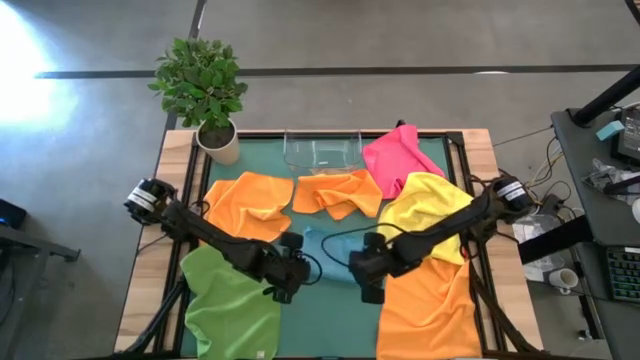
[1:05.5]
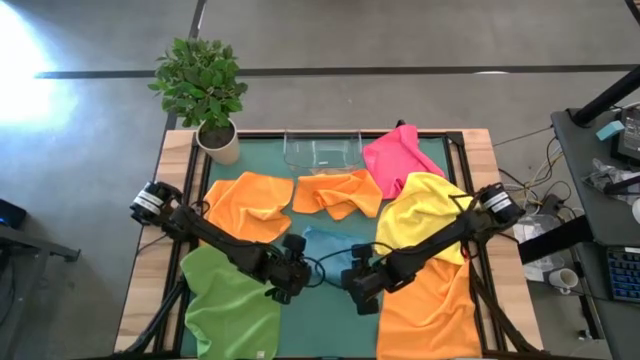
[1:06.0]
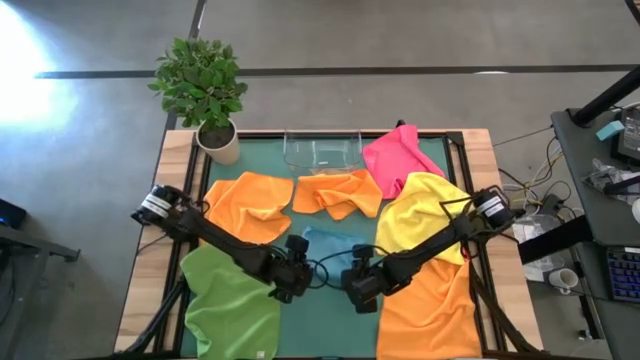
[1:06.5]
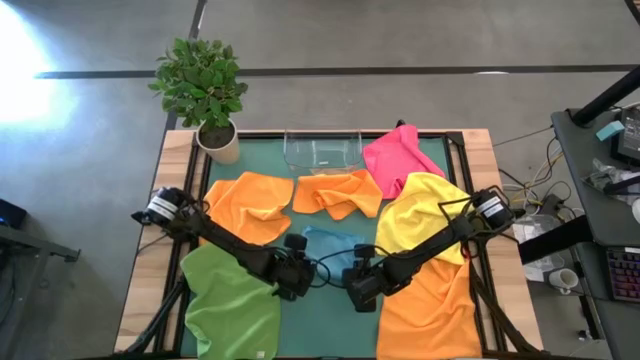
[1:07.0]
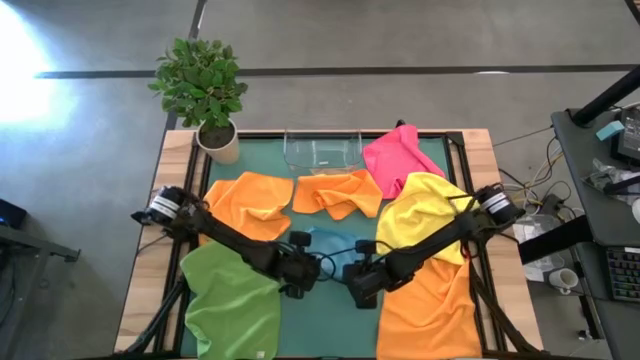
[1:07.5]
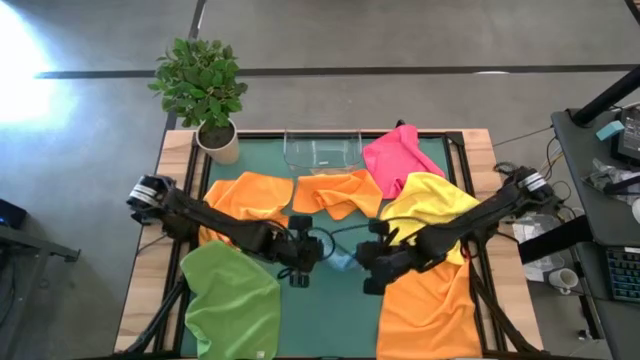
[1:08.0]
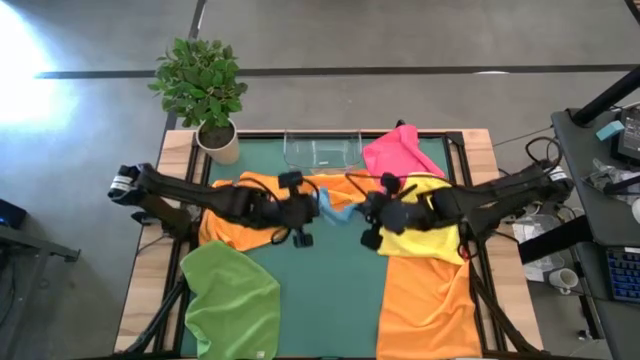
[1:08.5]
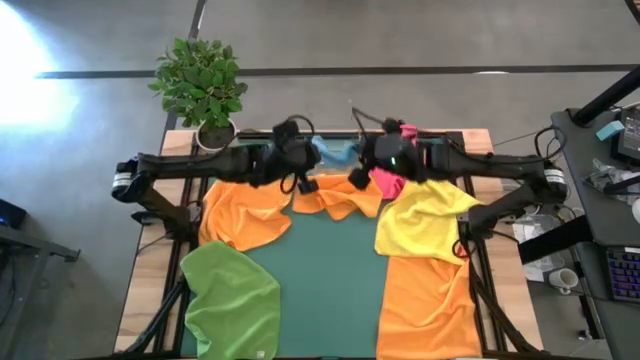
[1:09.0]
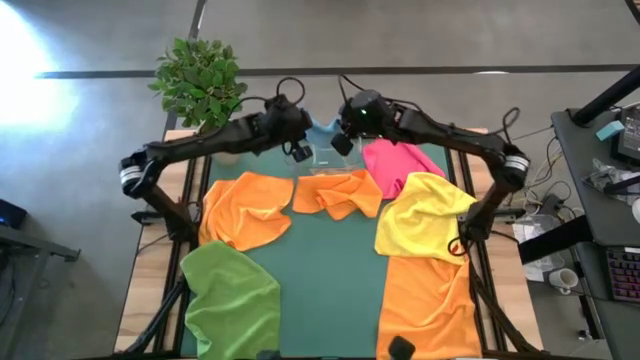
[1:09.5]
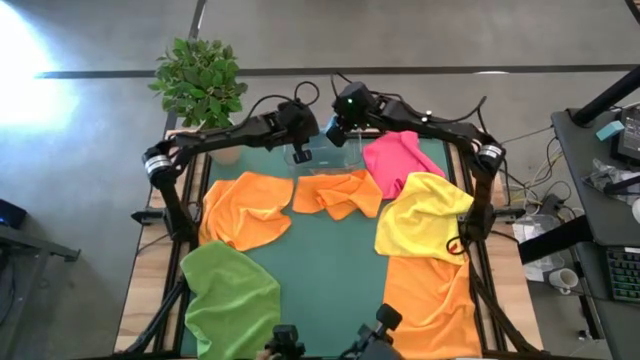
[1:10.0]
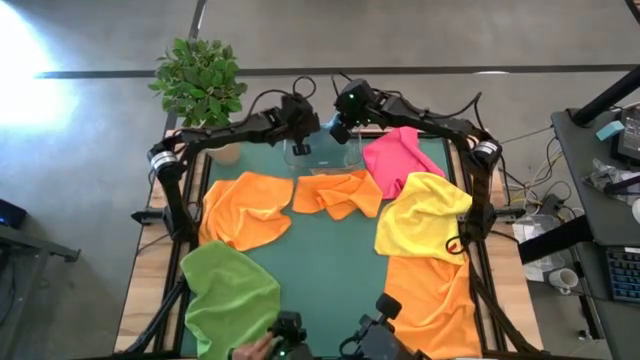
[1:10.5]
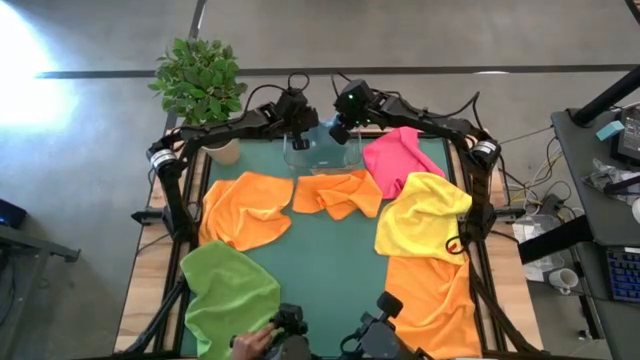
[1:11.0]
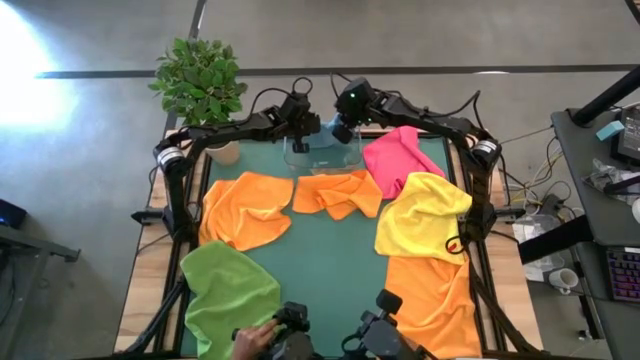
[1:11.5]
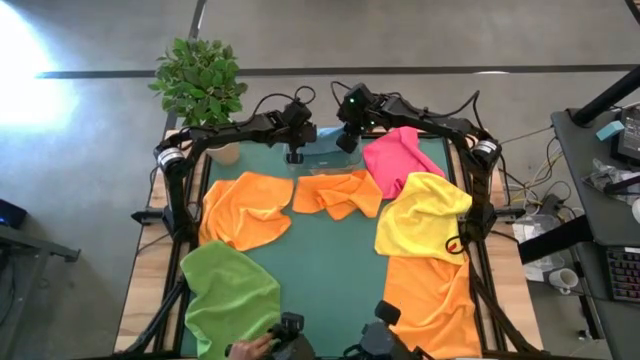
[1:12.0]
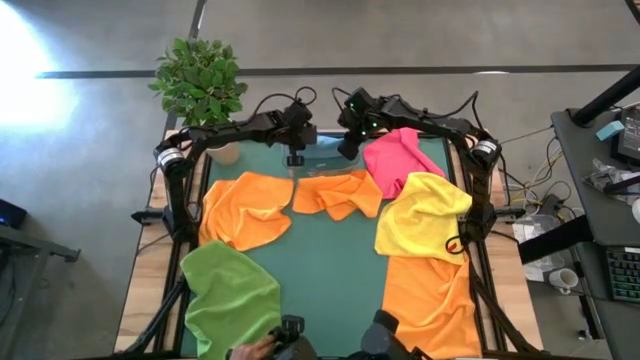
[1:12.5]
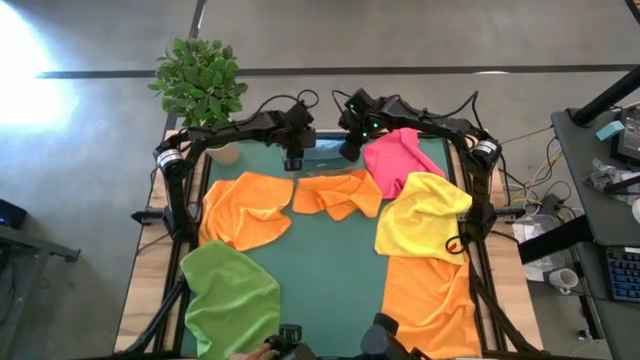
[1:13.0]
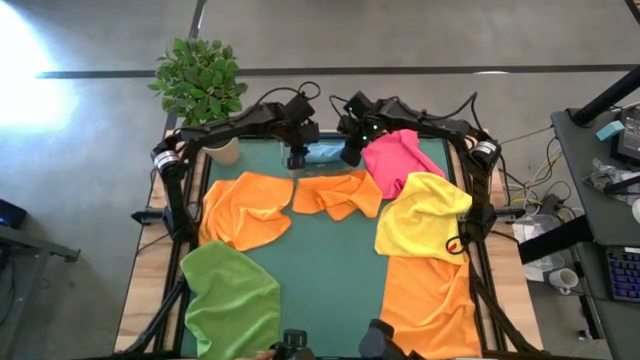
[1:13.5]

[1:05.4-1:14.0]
Task: Fold microfiber towels
Put the folded blue microfiber towel into the transparent bin
